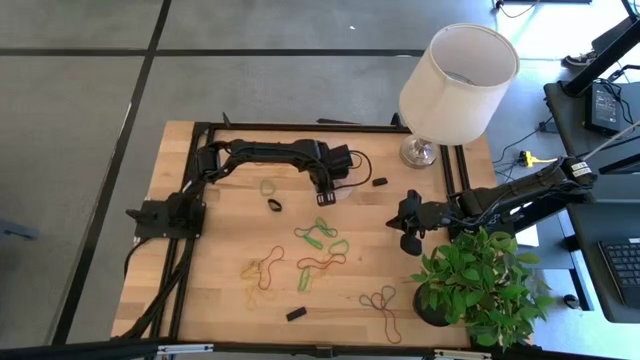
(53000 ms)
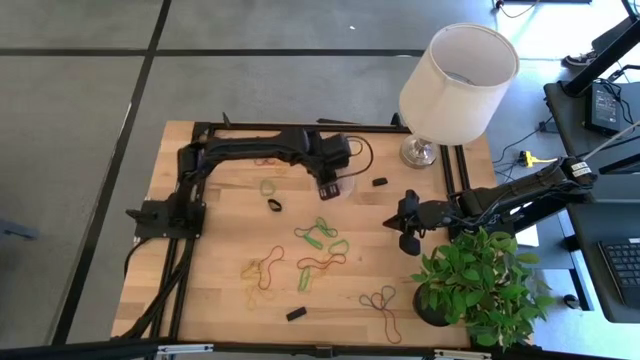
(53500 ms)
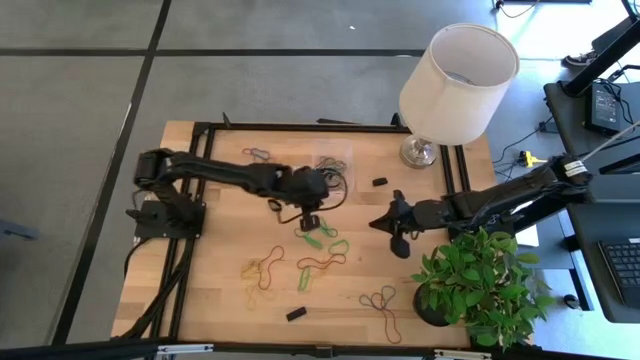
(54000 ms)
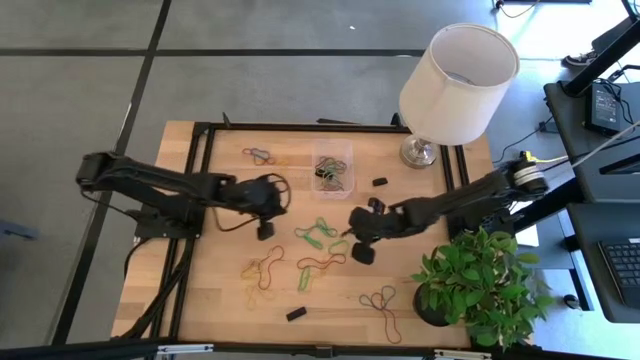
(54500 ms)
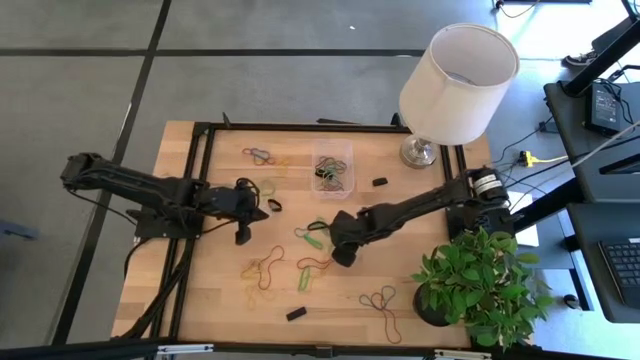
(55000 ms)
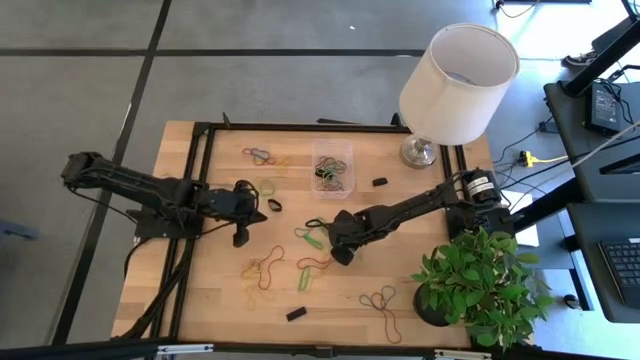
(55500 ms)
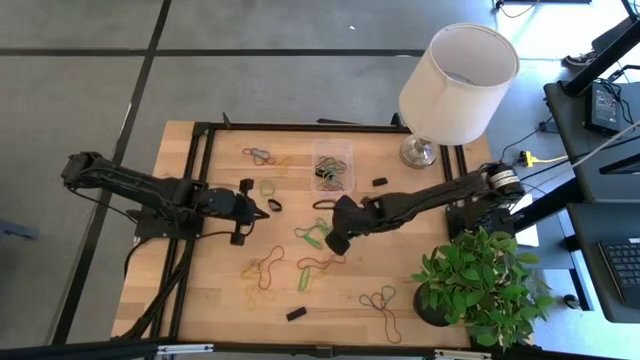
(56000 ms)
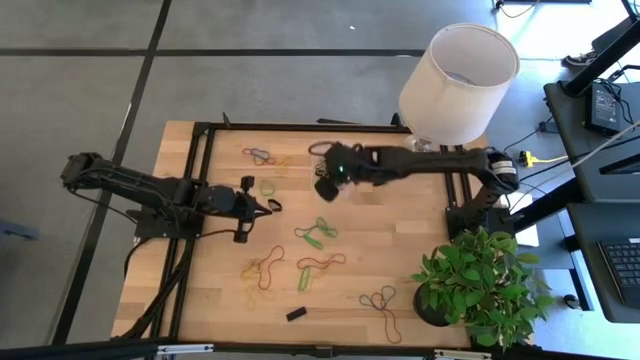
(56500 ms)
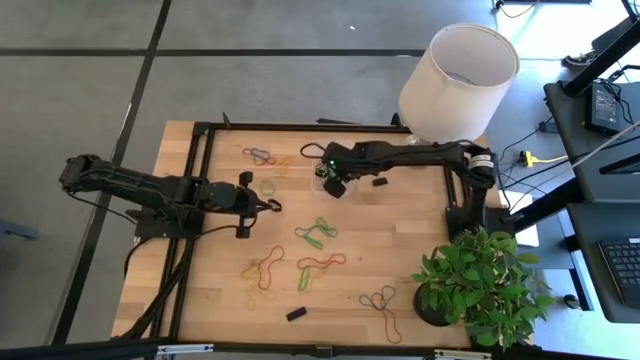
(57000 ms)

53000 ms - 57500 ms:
Task: Pick and place rubber bands into bin
Put the green rubber band into the transparent bin

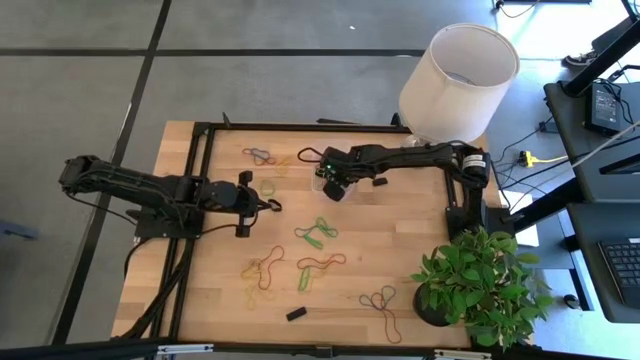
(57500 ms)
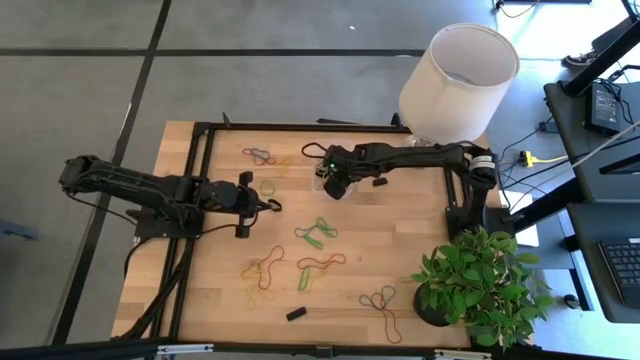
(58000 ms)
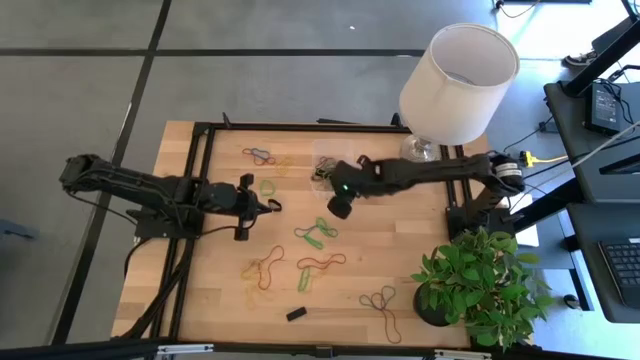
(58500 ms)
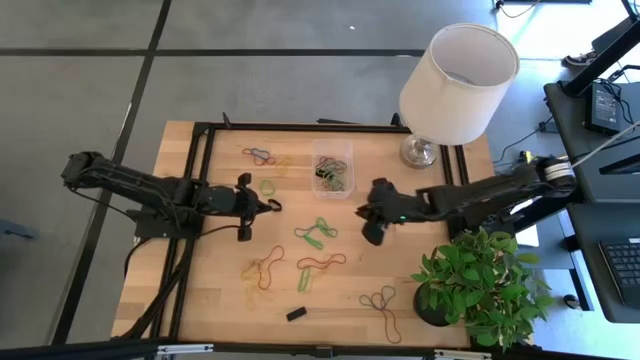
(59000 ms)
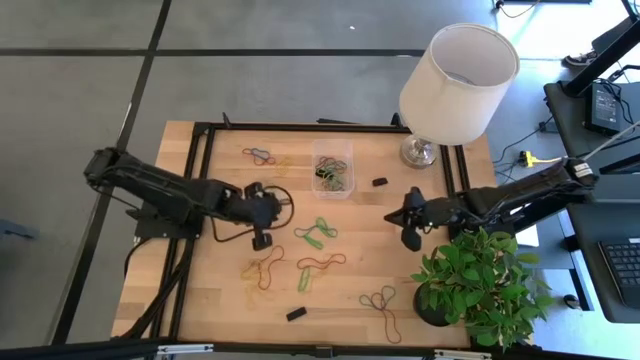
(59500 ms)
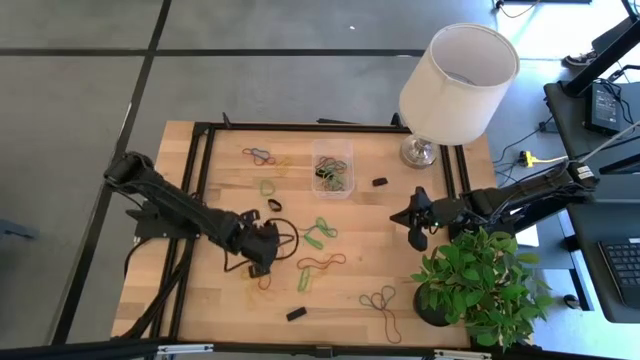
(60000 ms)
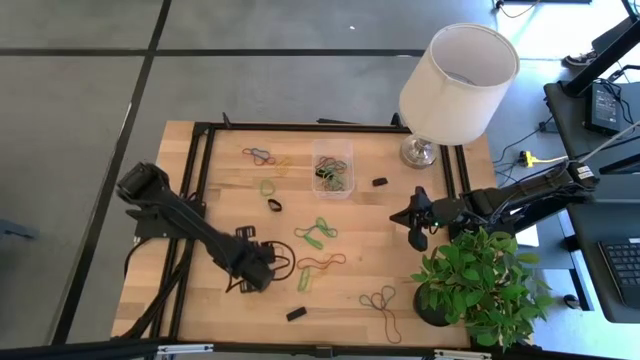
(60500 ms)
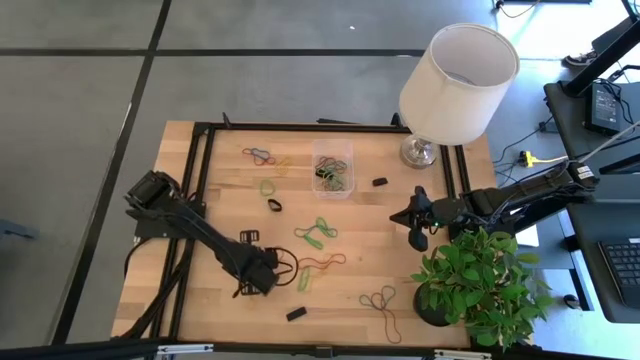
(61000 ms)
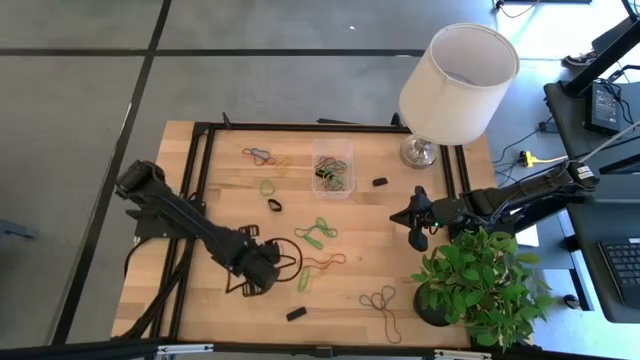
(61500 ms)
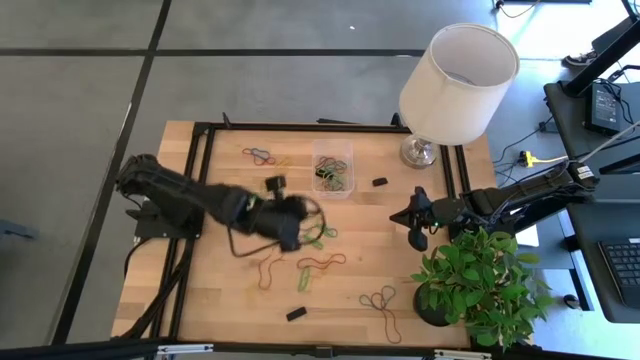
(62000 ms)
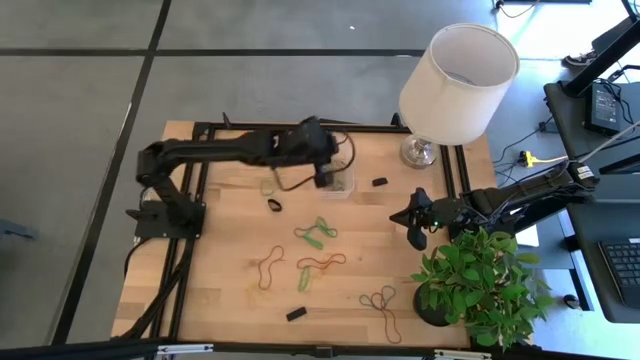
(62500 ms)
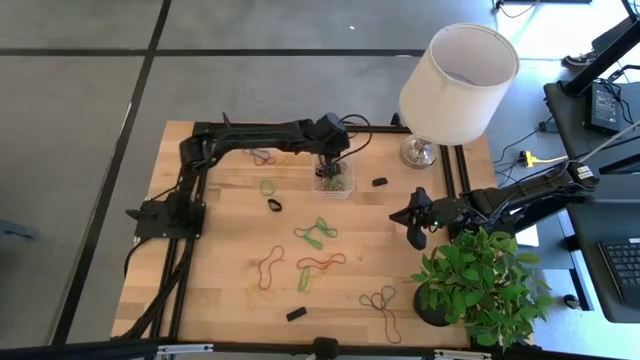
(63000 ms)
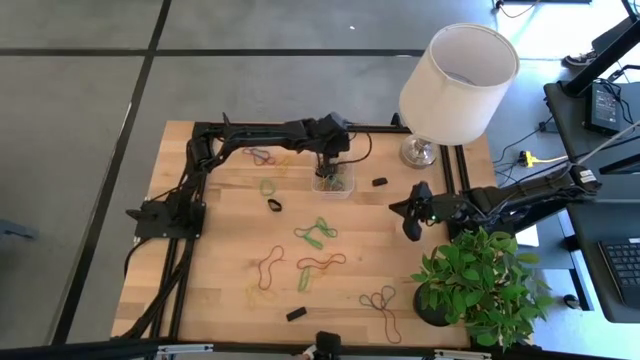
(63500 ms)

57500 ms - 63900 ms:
Put the yellow rubber band into the transparent bin

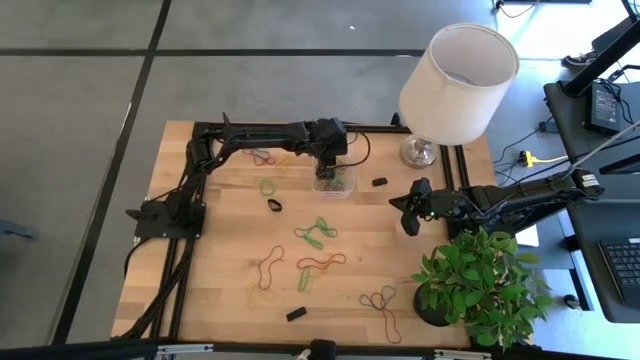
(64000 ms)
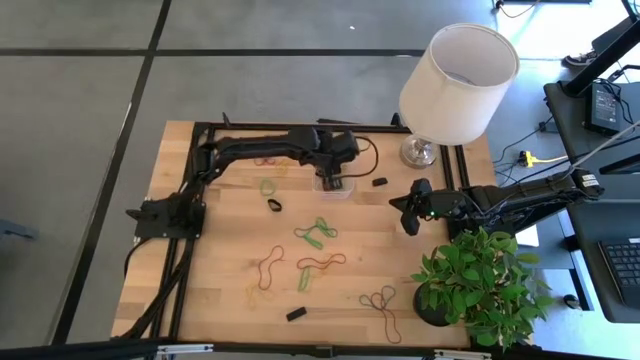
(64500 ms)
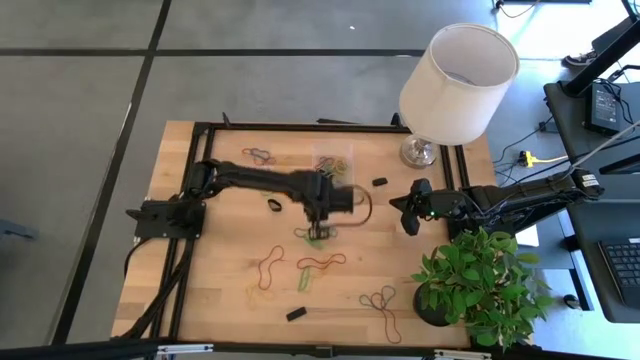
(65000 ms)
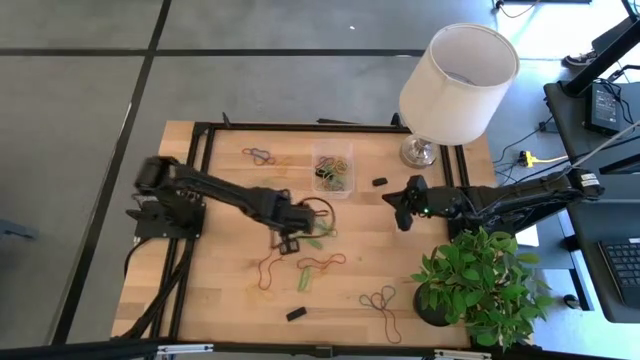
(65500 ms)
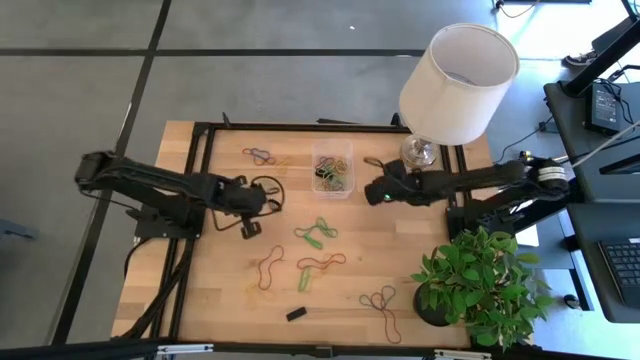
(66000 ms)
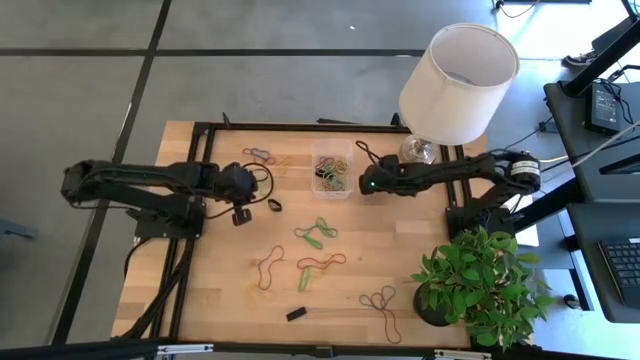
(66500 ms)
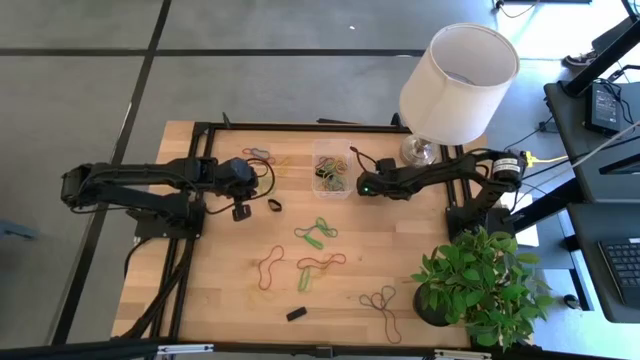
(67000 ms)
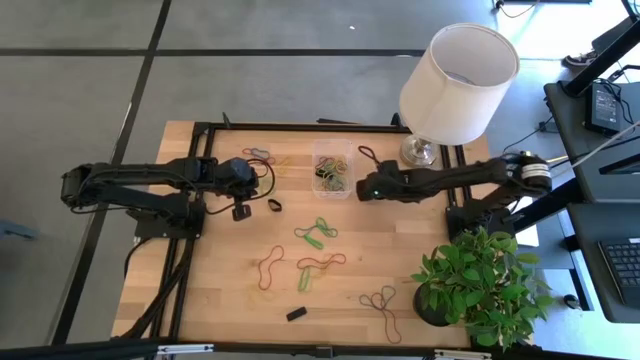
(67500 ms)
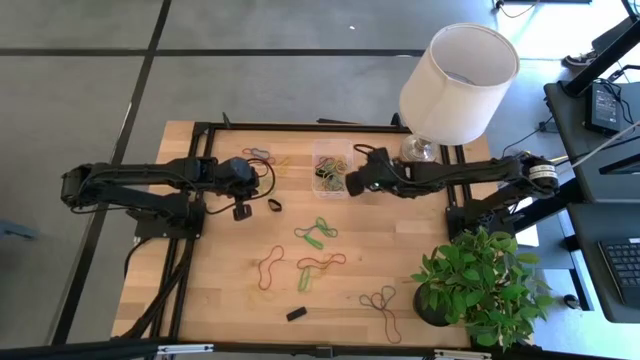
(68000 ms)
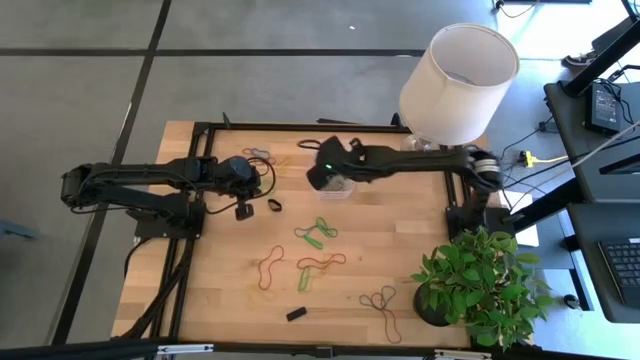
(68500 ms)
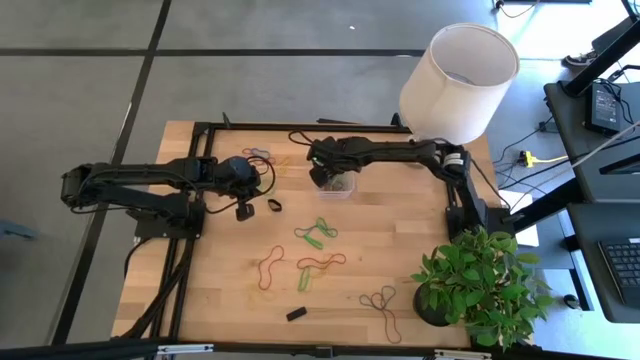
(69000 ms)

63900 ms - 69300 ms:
Put the black rubber band into the transparent bin

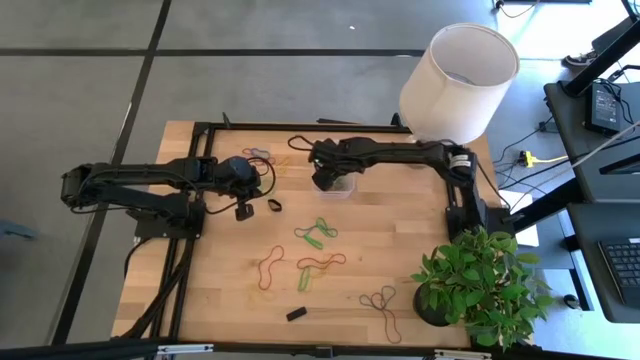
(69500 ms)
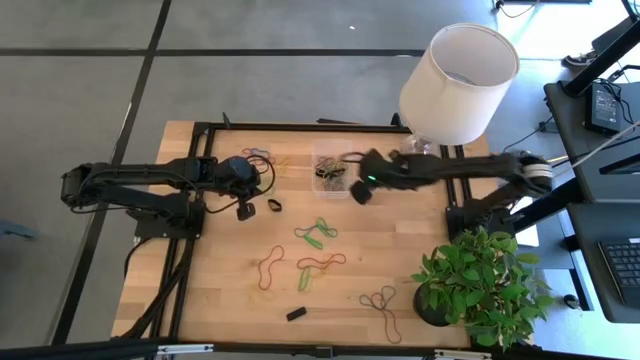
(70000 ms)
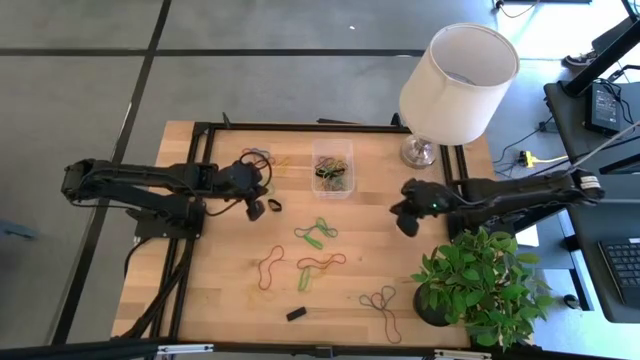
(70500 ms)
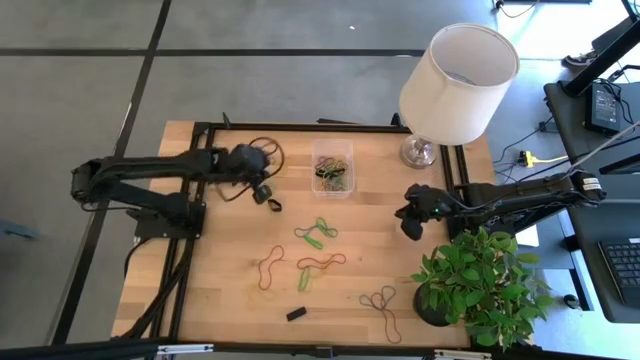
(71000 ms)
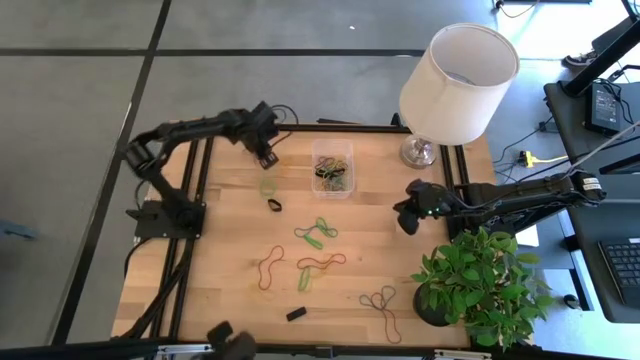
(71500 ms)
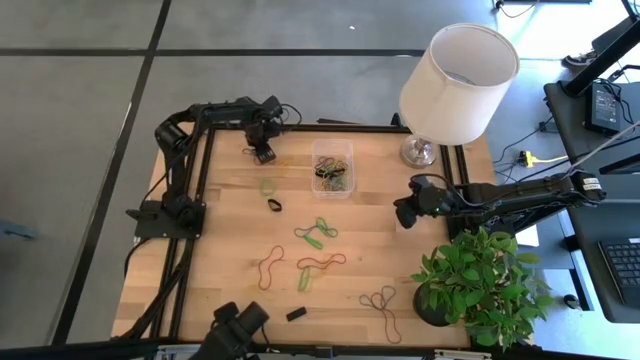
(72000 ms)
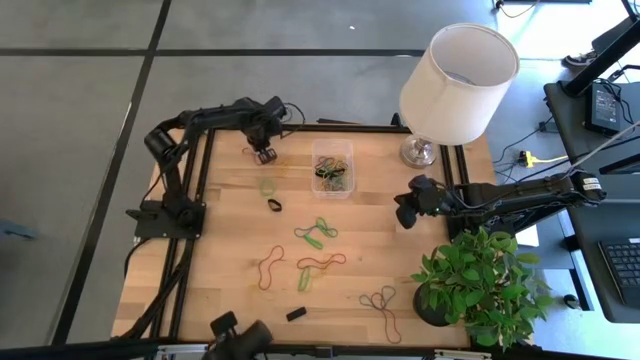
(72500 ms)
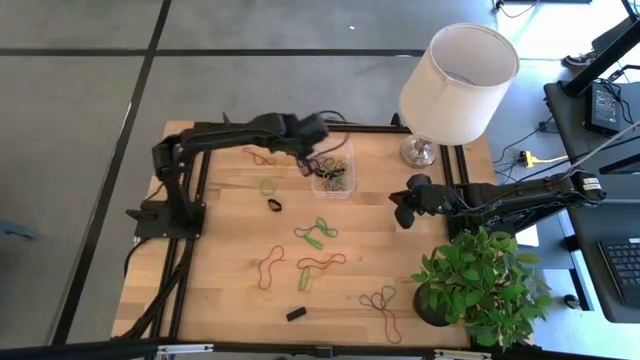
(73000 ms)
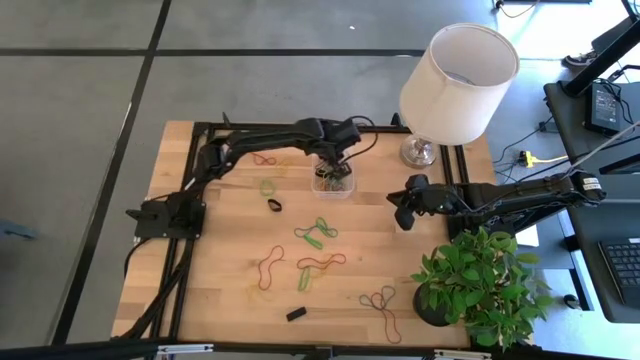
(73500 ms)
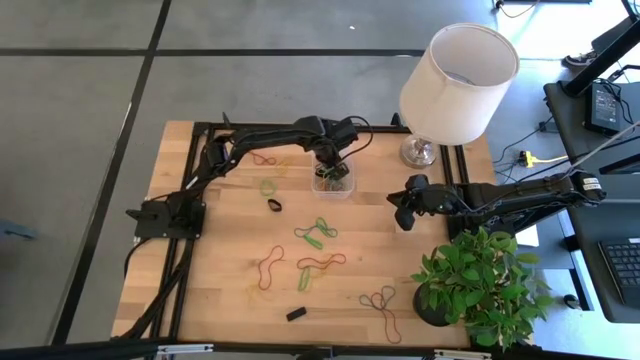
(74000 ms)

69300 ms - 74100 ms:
Put the blue rubber band into the transparent bin

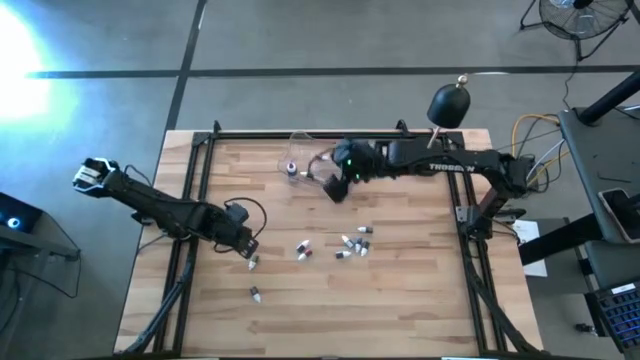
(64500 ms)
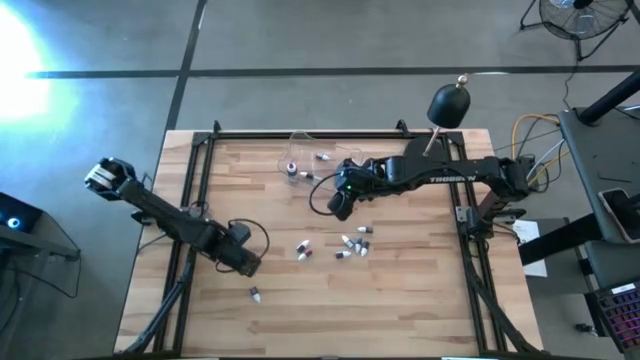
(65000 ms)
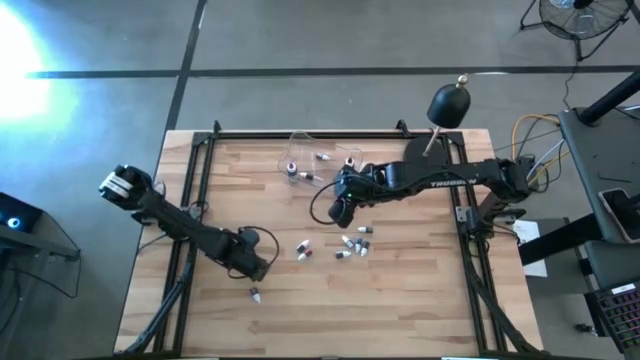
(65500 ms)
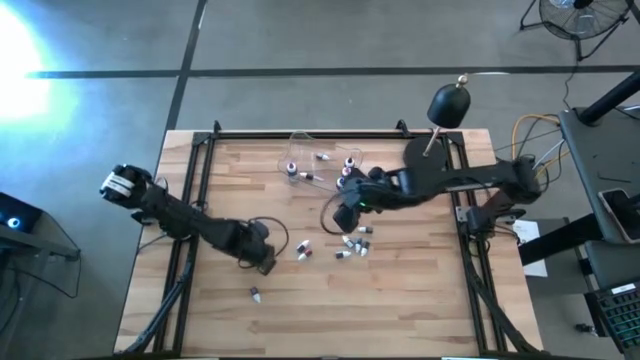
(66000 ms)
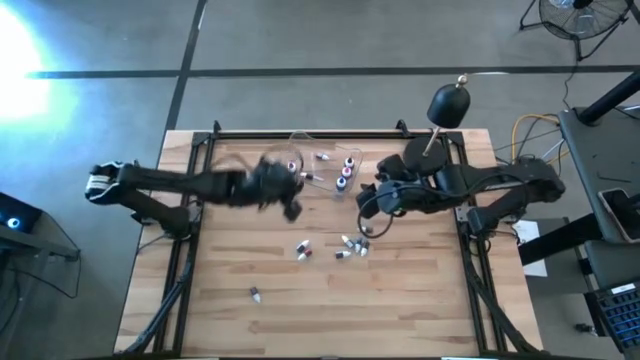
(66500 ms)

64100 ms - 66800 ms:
Task: Pick & Place food coloring
Put the bottom small green food coloring bottle into the transparent bin
